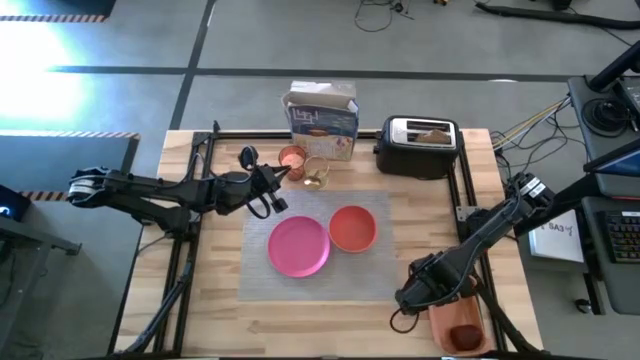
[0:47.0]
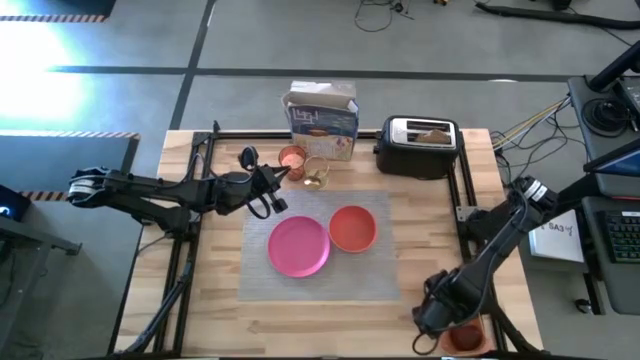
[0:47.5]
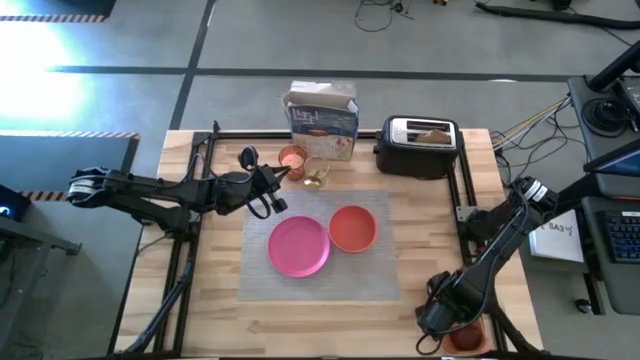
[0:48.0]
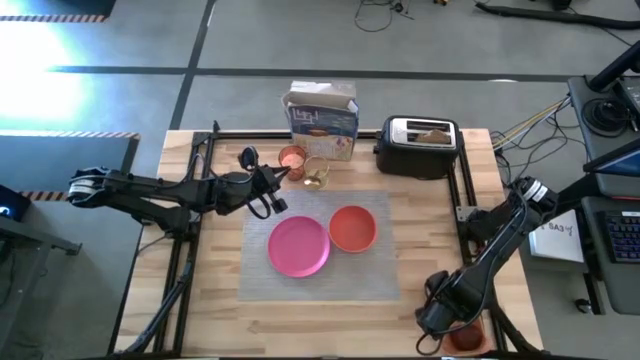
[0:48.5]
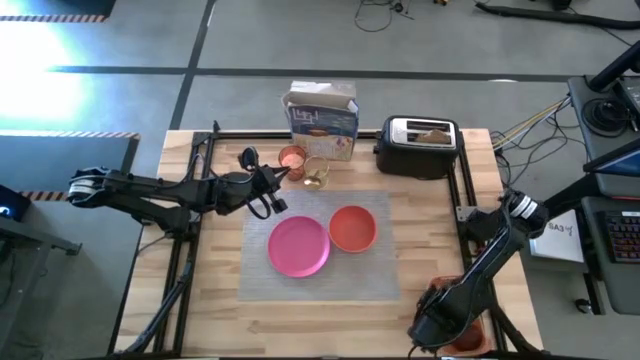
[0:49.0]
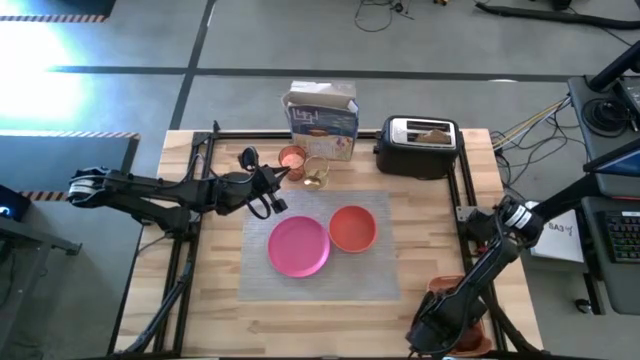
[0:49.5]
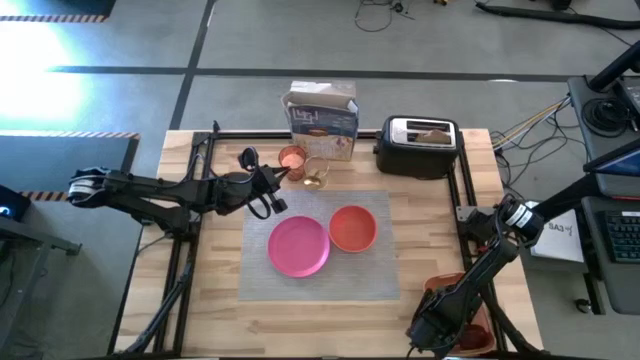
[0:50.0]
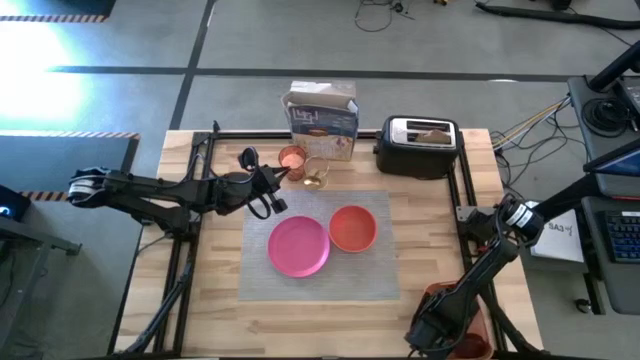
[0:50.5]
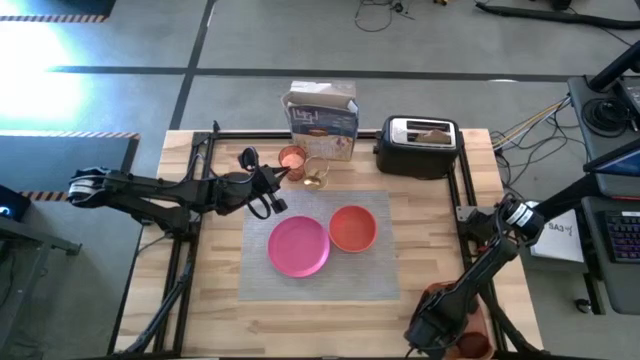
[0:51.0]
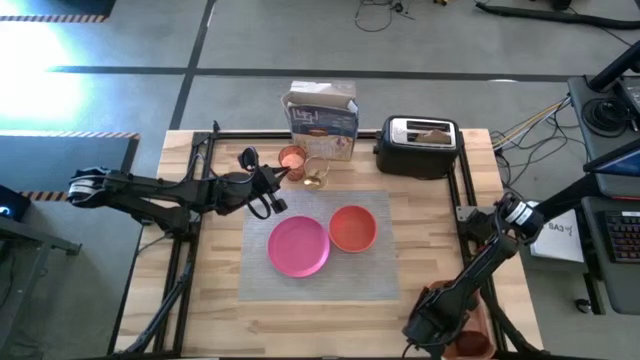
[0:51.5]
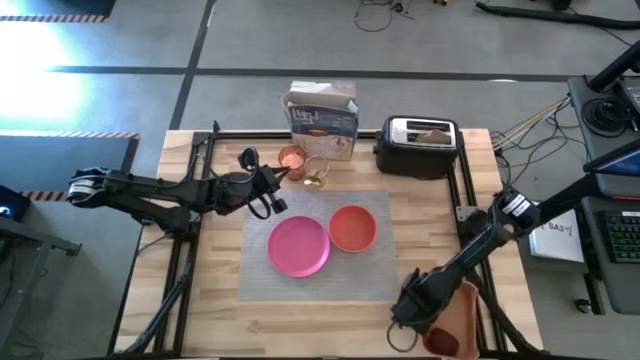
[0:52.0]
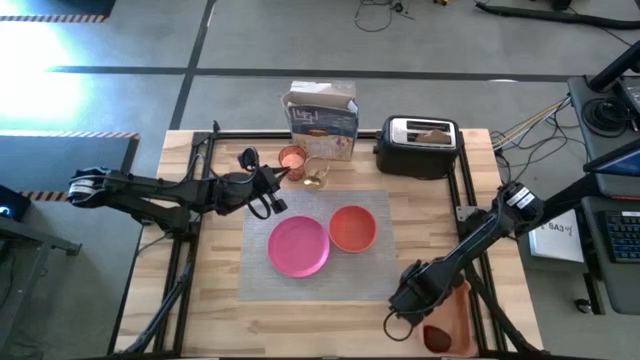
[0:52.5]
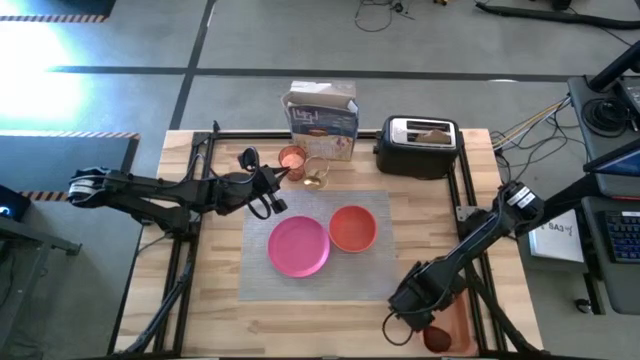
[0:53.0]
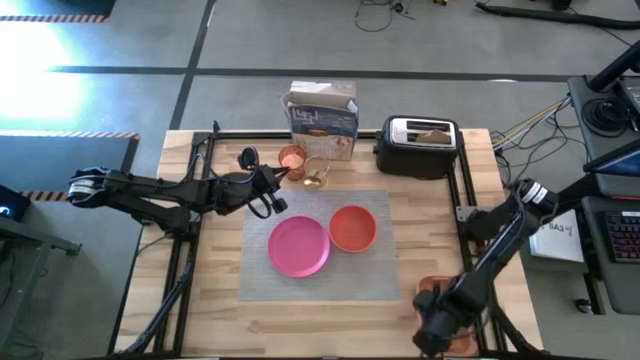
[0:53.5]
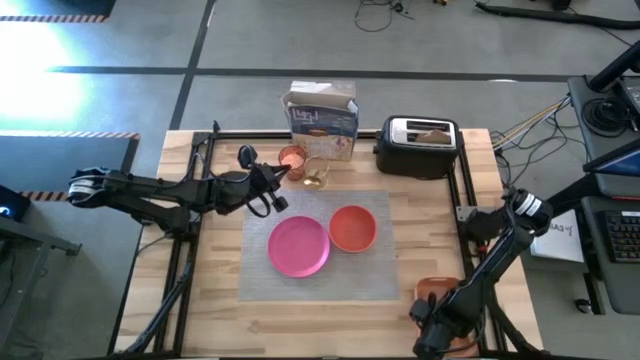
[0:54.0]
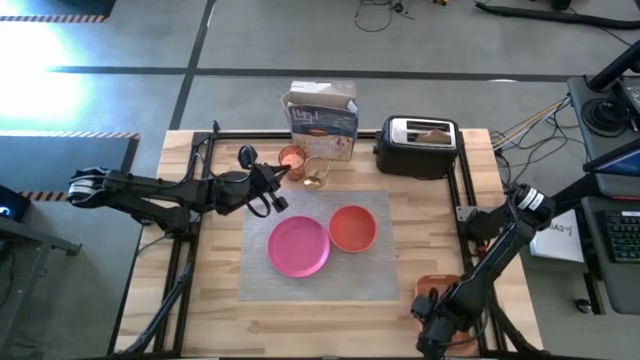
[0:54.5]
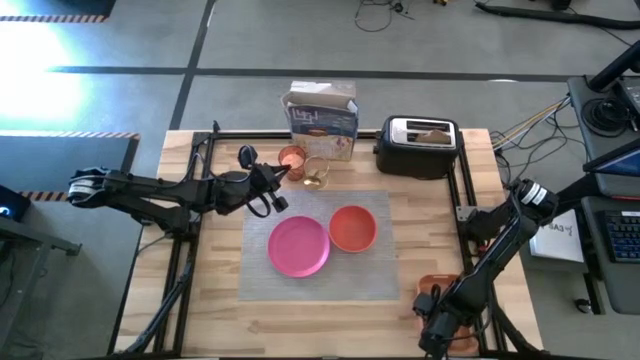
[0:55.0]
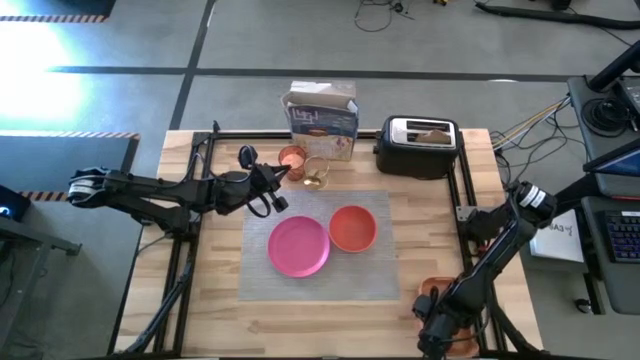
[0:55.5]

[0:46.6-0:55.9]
Task: Arrange a breakfast setting
Put the red apple to the top left of the pink plate on the table mat

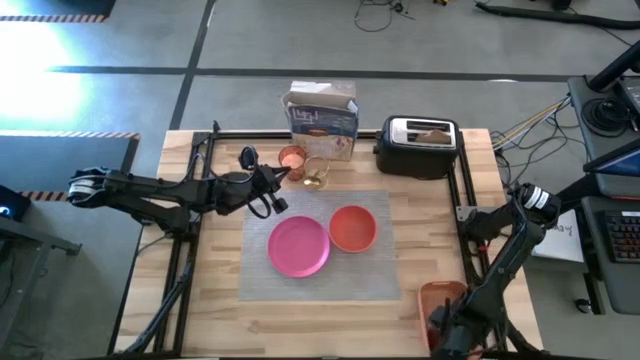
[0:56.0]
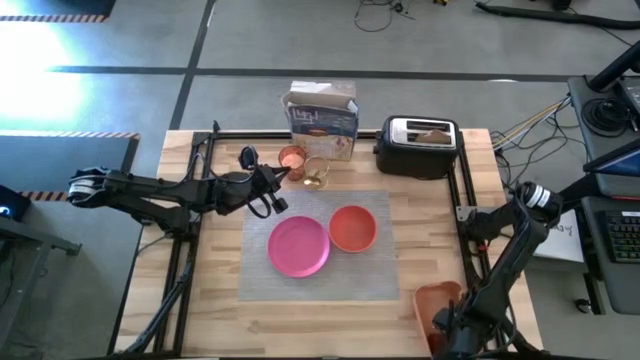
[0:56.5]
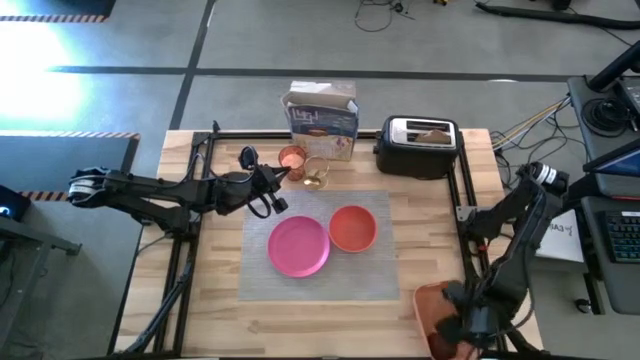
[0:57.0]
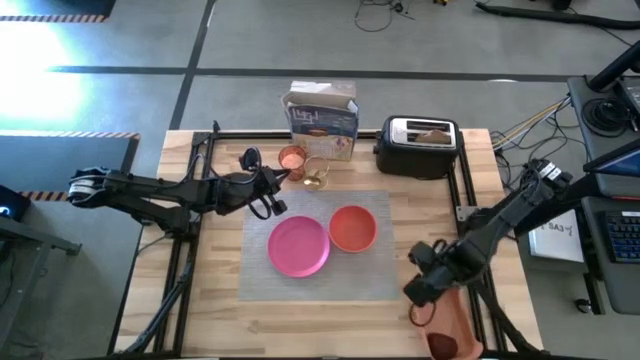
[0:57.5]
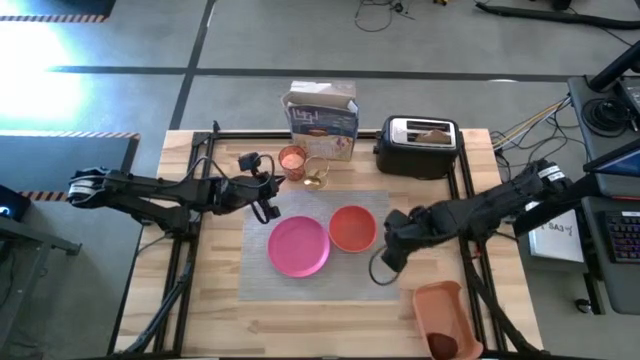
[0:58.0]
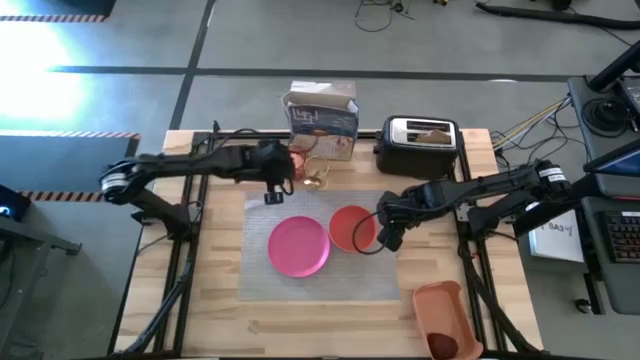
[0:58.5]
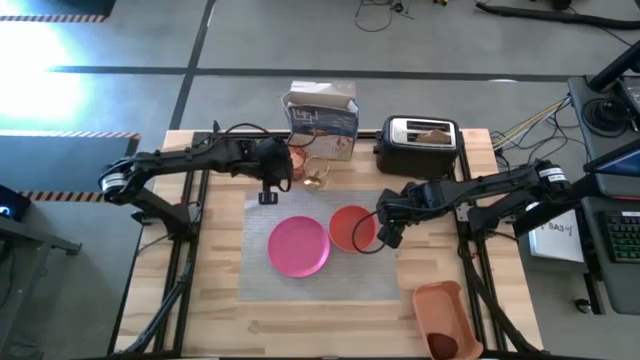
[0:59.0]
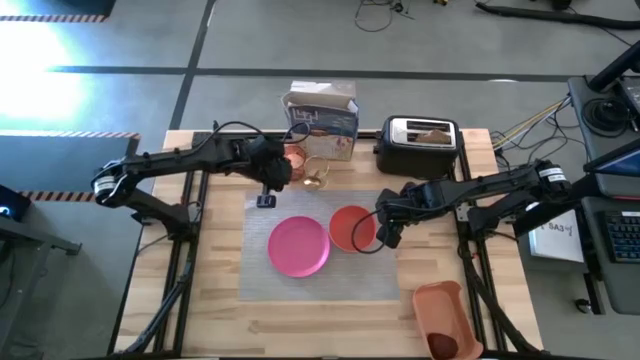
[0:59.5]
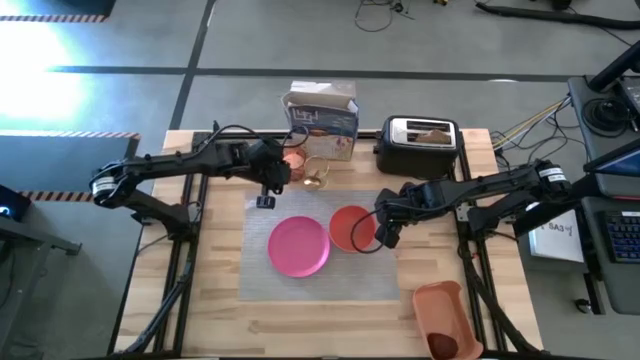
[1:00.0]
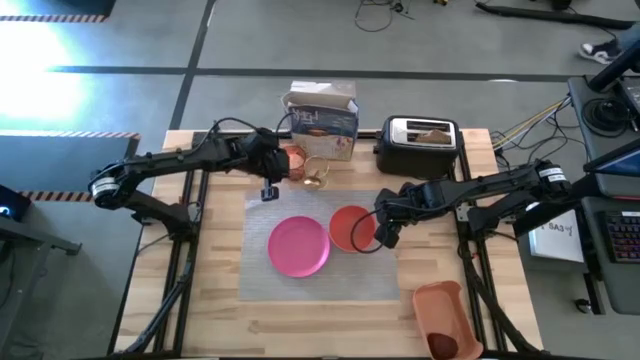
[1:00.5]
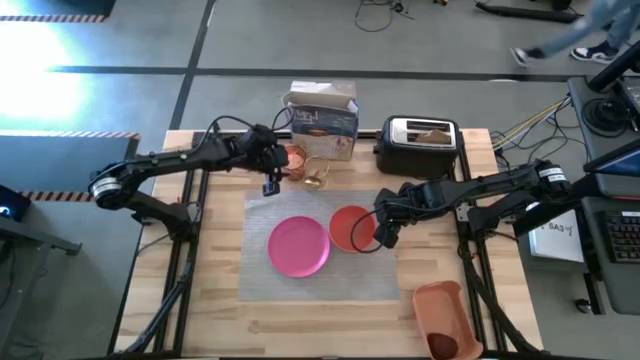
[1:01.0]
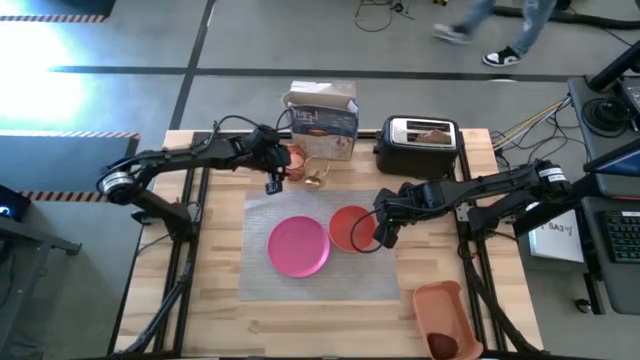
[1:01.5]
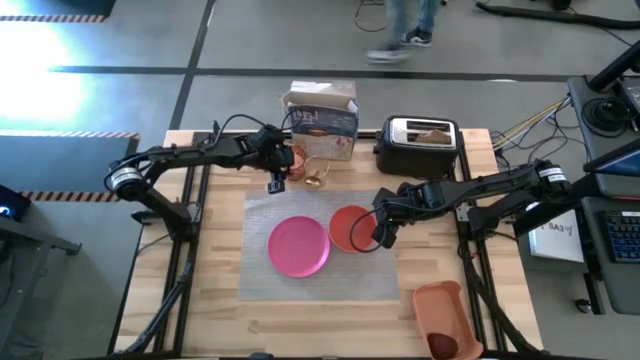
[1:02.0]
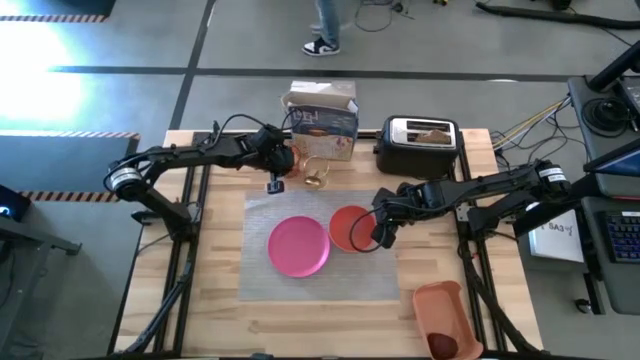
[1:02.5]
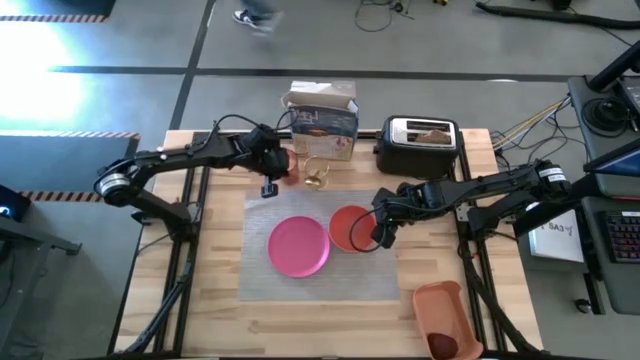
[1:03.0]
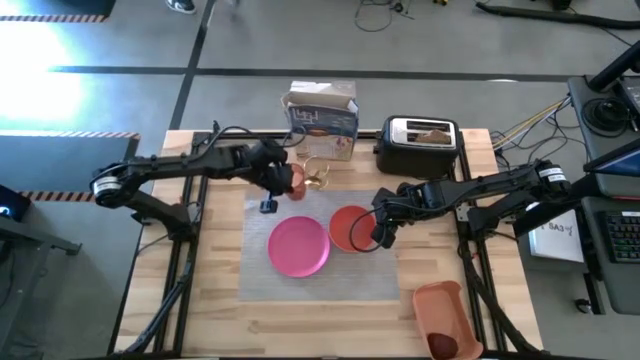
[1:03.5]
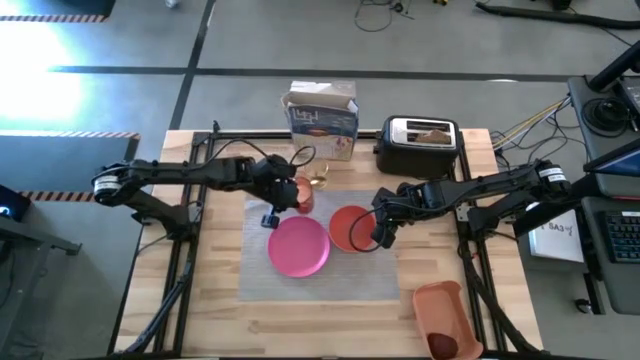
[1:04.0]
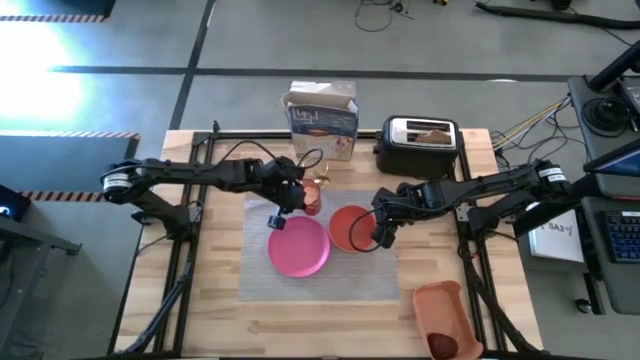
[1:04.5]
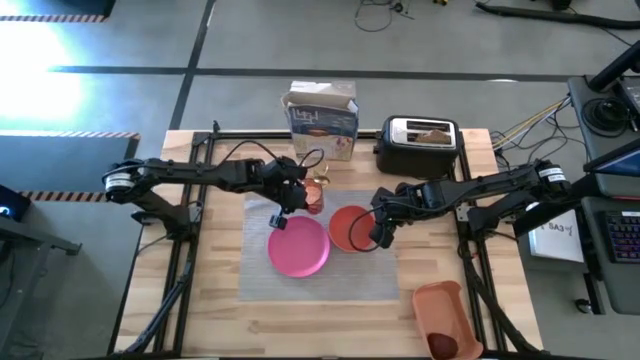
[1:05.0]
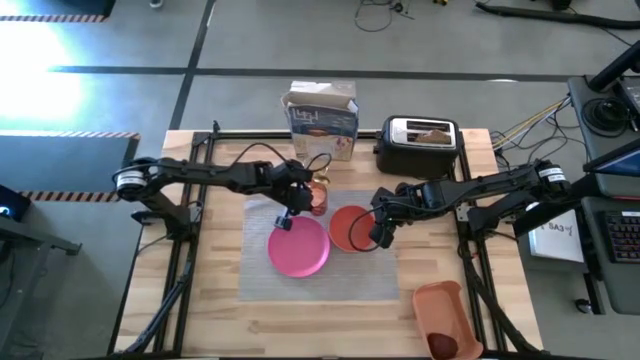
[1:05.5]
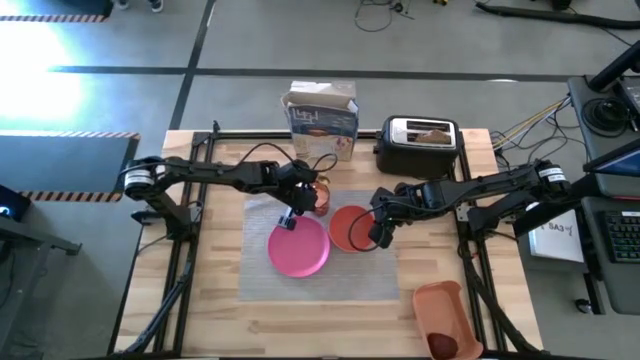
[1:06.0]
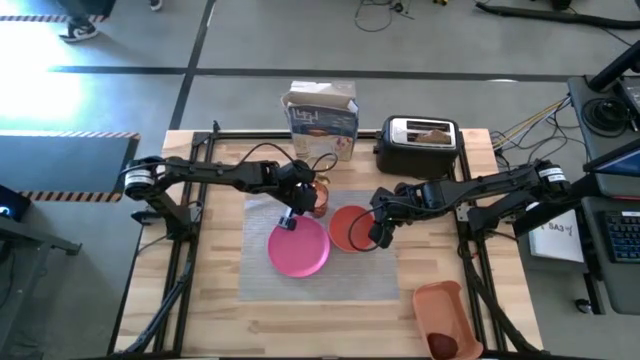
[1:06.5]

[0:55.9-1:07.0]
Put the orange cup with rice to the top of the pink plate on the table mat
